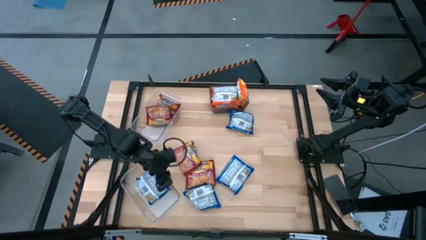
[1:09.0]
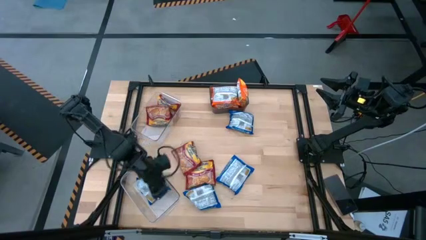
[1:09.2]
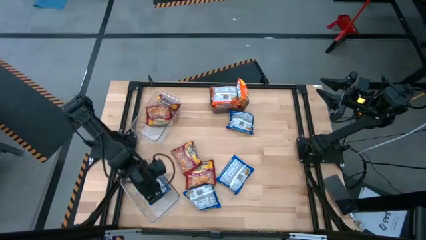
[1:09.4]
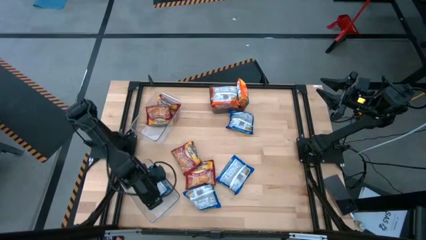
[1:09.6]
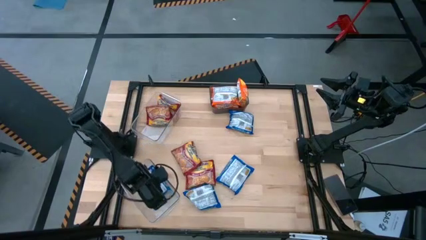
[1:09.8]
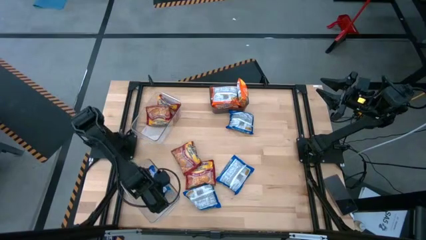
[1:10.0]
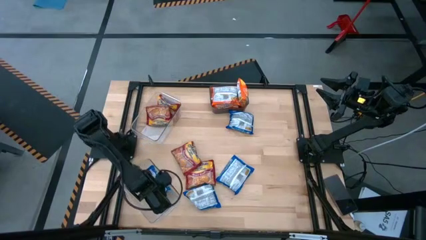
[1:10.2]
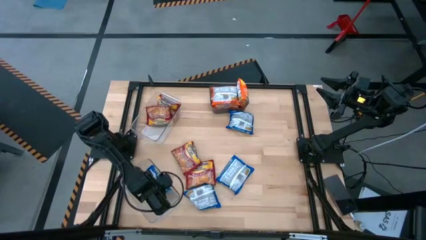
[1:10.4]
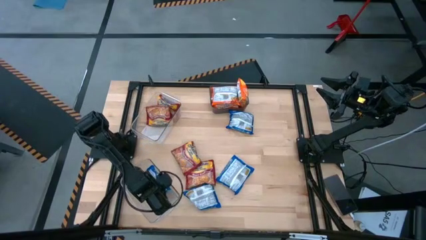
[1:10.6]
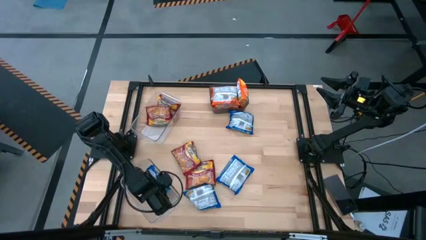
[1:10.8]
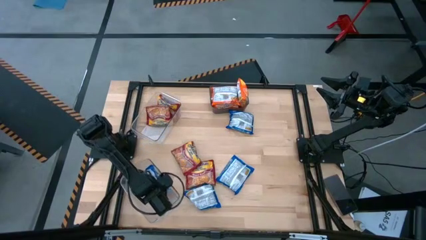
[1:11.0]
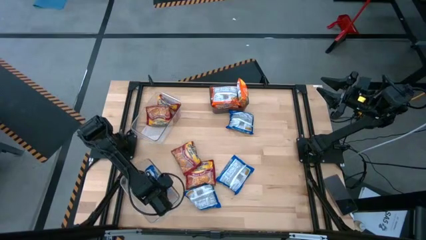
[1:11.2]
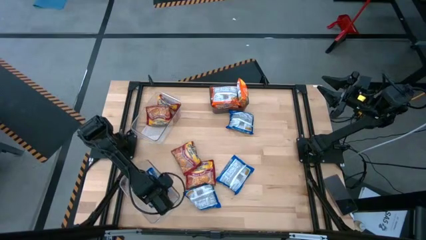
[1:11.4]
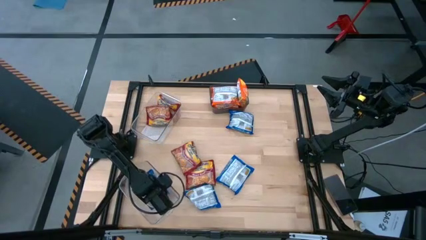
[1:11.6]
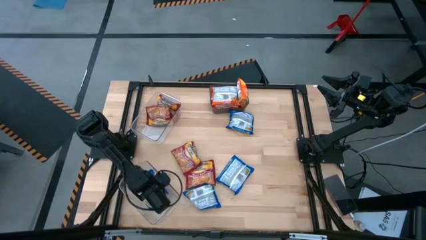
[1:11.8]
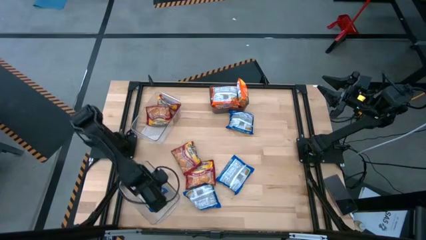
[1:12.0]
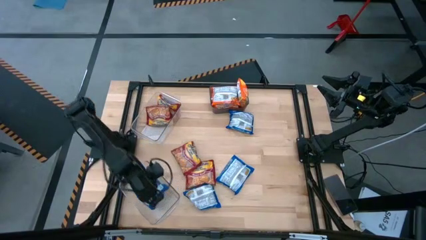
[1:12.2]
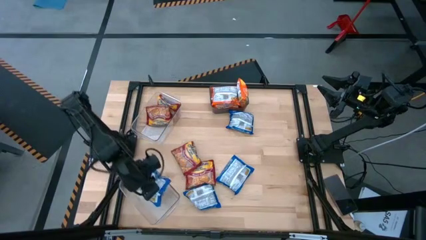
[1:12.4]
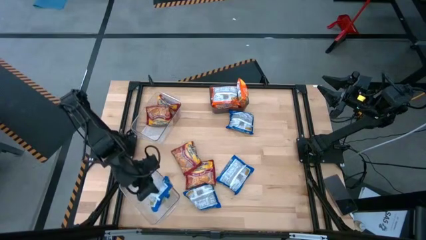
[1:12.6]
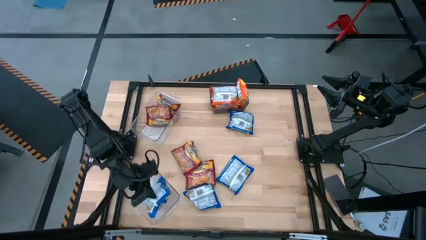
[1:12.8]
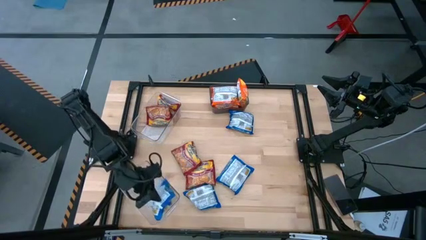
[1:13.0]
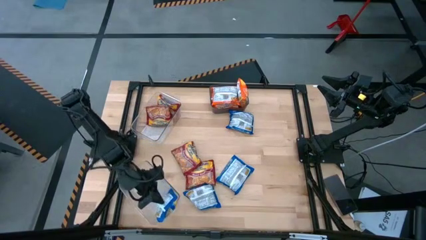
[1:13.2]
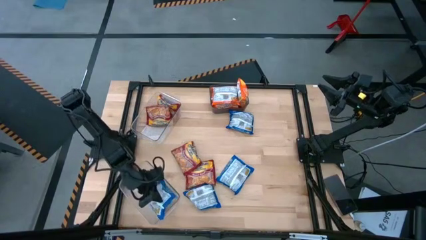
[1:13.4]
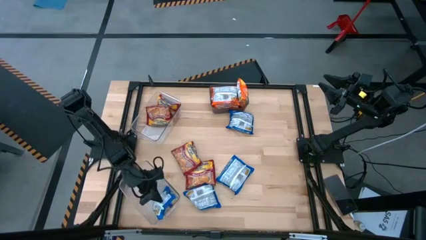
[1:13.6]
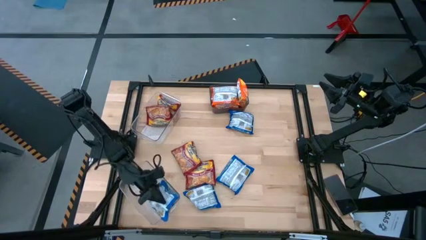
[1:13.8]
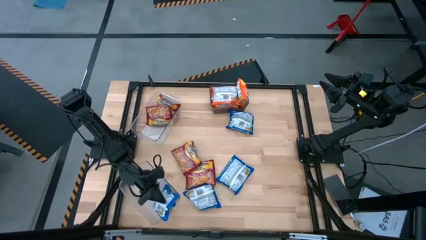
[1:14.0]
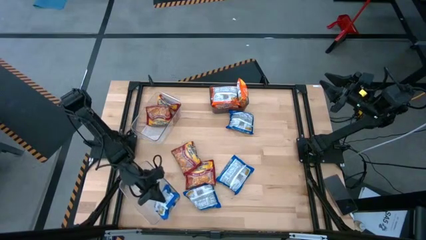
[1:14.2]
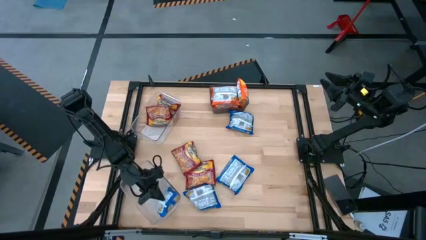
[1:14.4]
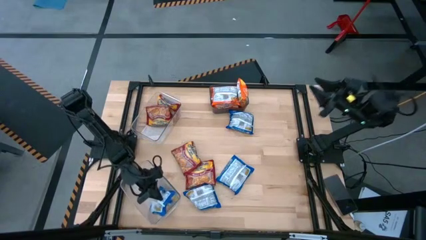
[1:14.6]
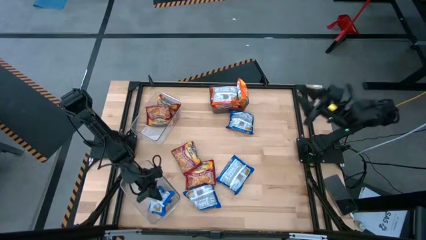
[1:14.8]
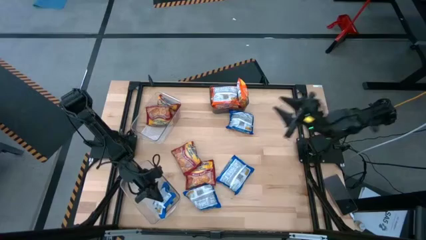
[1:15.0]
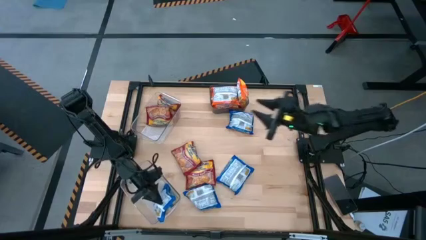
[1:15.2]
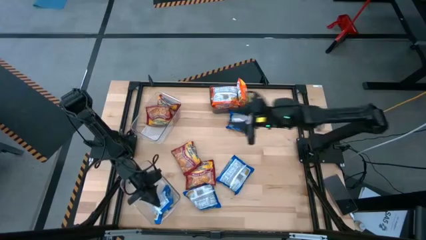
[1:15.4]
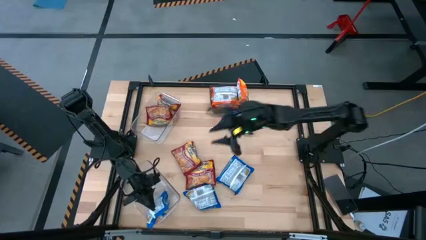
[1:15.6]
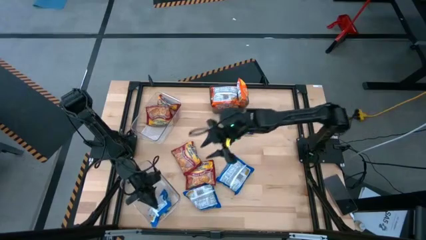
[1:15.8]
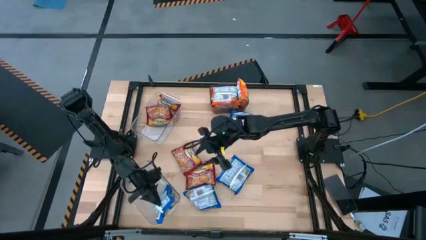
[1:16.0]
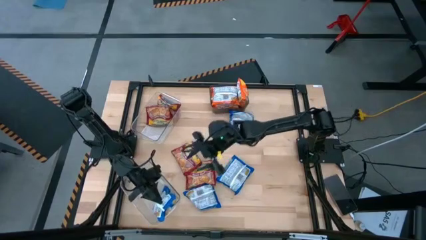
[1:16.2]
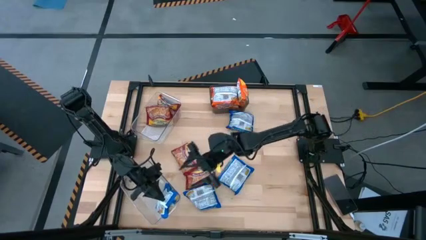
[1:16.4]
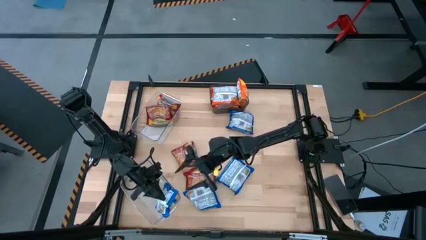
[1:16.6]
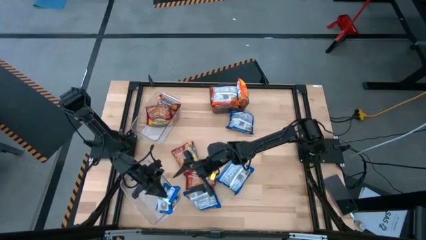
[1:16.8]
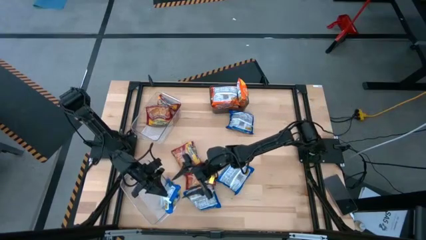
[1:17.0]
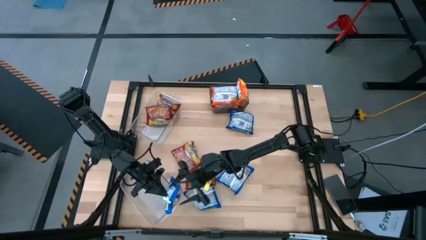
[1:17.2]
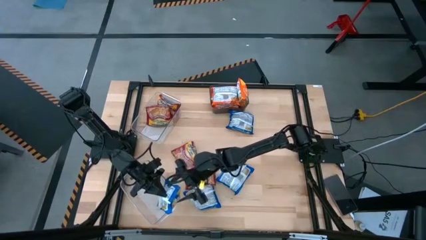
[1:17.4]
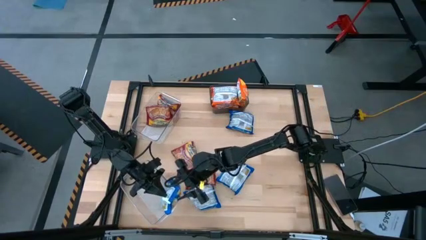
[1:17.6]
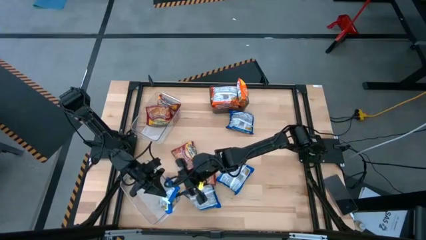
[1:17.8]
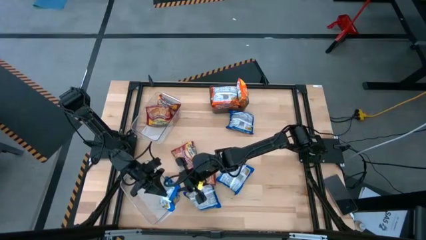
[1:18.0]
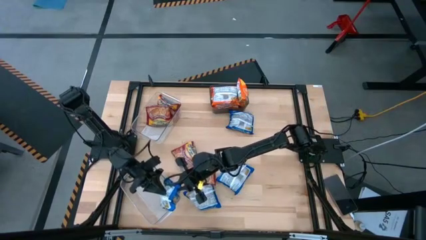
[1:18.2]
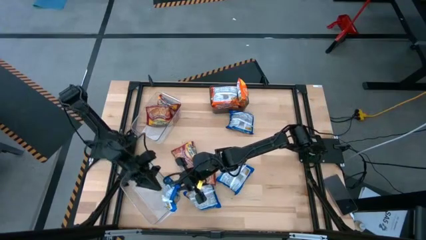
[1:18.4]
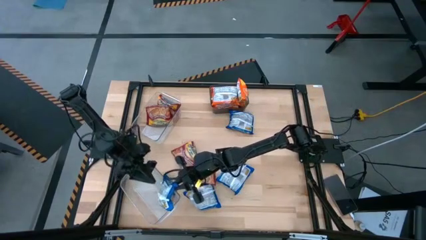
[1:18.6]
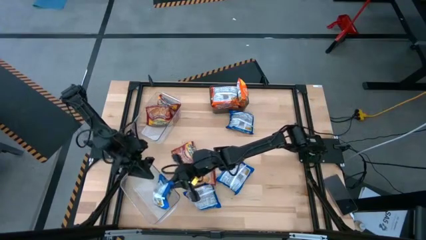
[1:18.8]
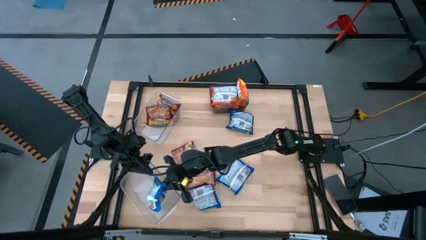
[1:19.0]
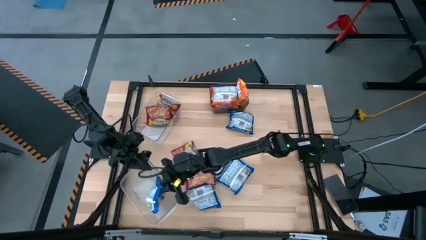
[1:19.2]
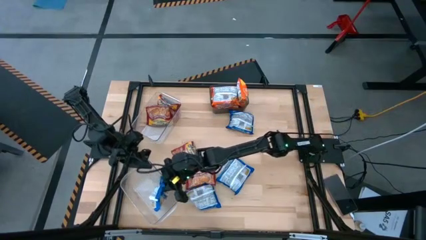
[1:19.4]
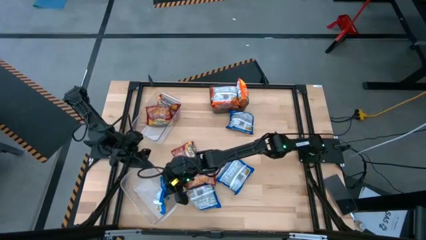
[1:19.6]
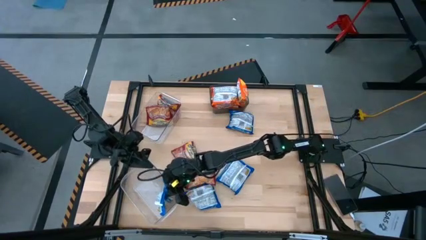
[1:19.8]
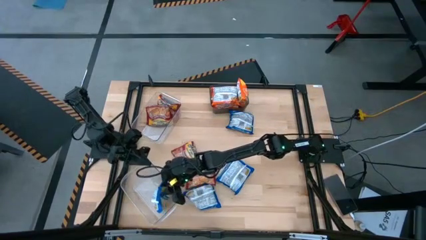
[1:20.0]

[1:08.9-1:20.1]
Task: Sort Maruchan noodles
Put the middle blue noodle pack into the bottom transparent bin
